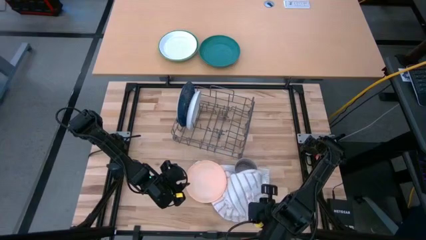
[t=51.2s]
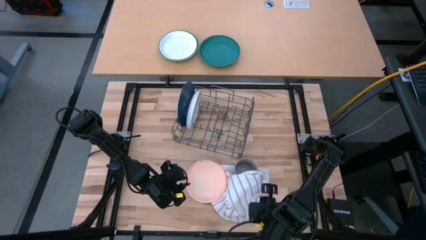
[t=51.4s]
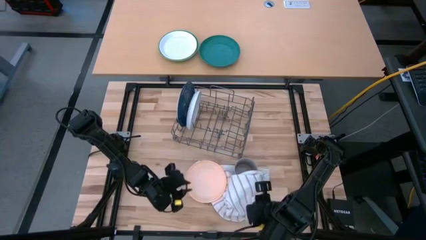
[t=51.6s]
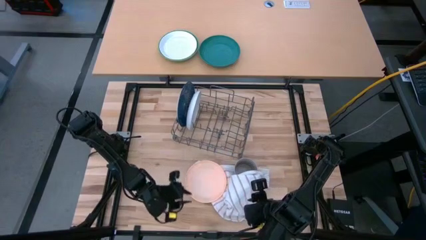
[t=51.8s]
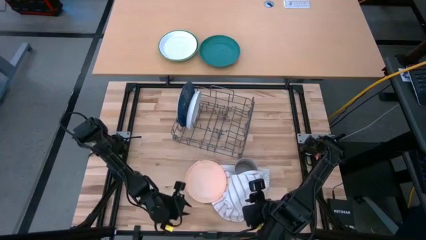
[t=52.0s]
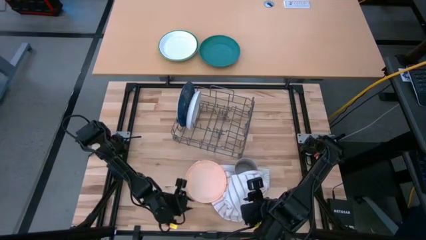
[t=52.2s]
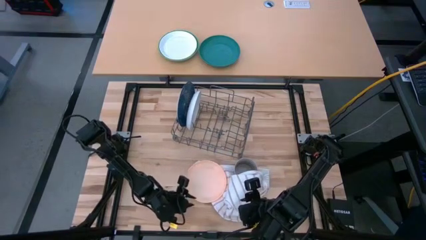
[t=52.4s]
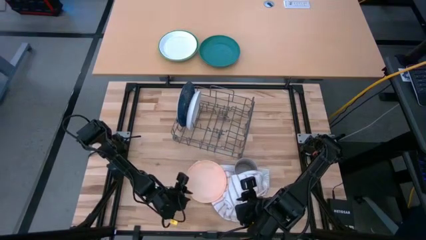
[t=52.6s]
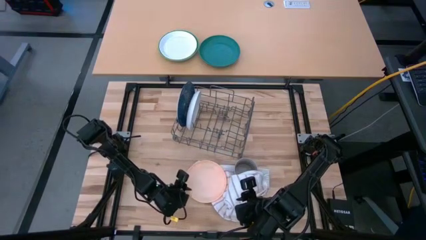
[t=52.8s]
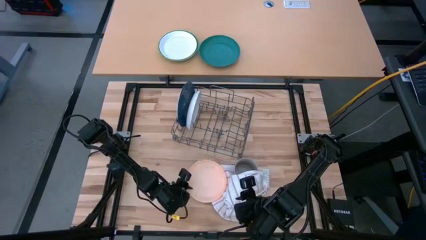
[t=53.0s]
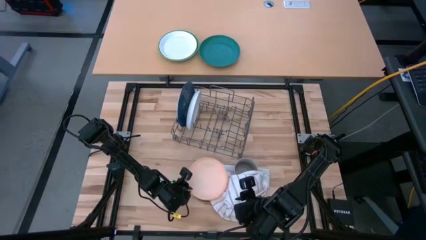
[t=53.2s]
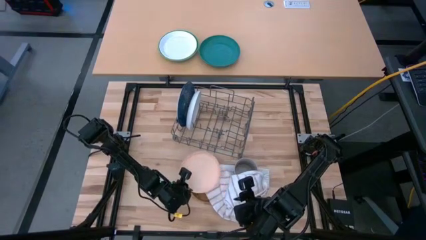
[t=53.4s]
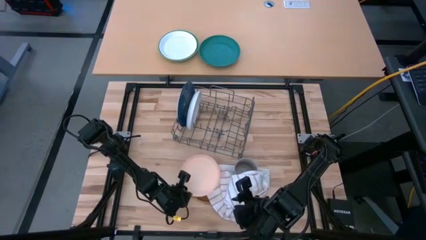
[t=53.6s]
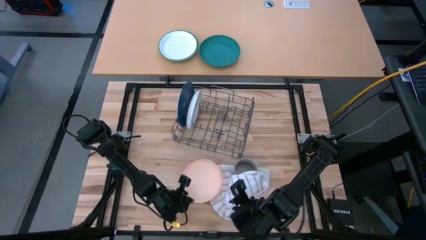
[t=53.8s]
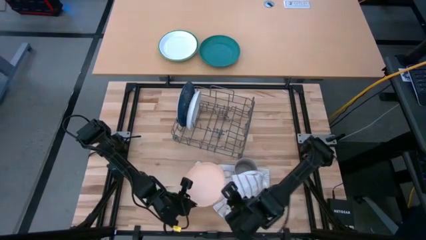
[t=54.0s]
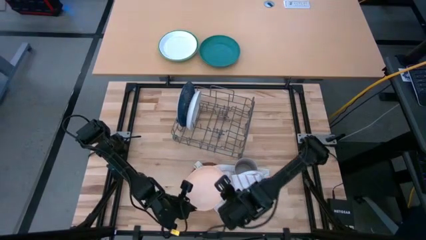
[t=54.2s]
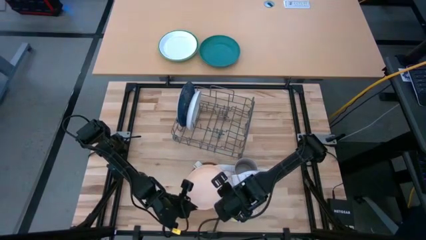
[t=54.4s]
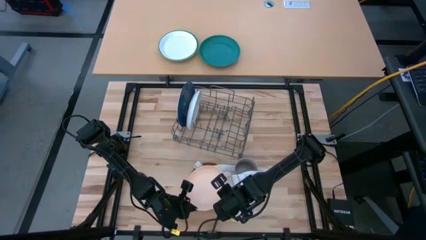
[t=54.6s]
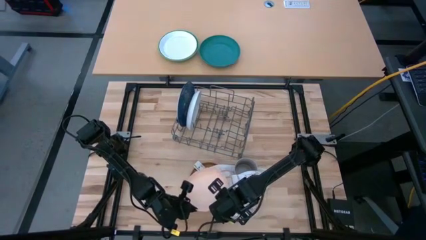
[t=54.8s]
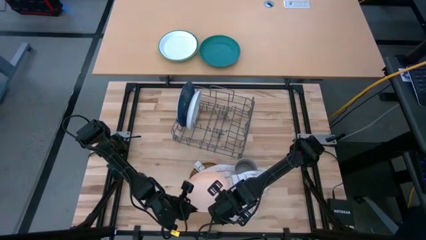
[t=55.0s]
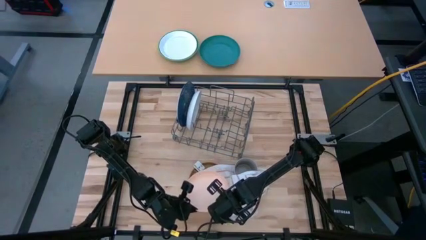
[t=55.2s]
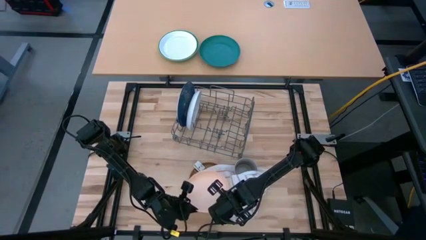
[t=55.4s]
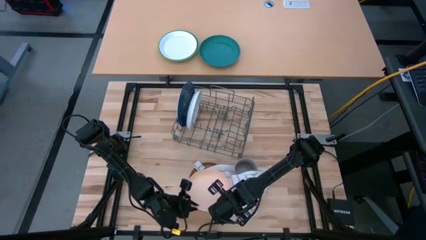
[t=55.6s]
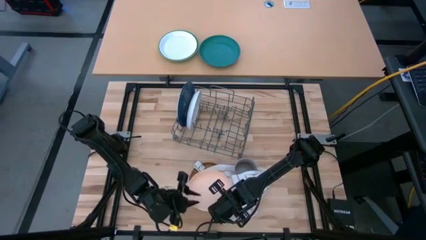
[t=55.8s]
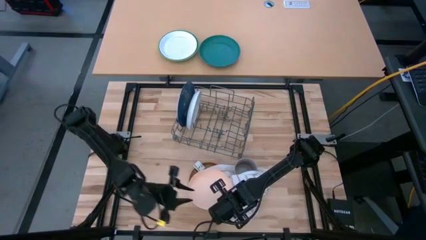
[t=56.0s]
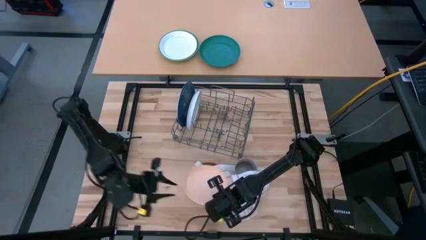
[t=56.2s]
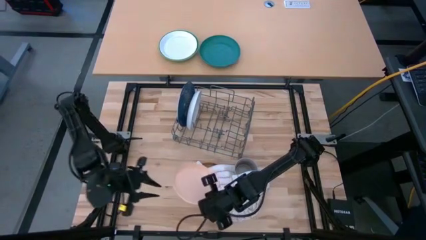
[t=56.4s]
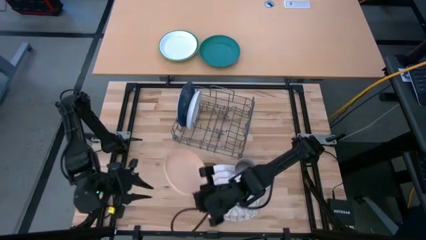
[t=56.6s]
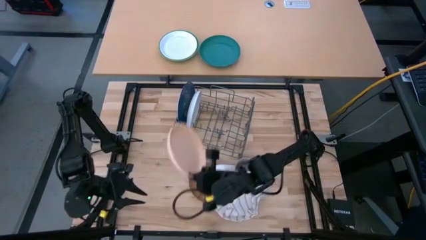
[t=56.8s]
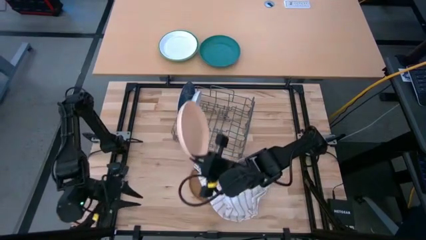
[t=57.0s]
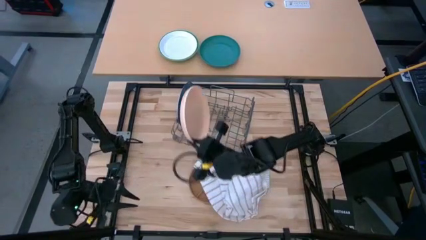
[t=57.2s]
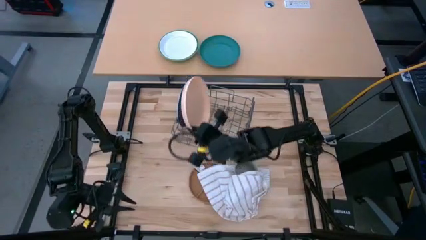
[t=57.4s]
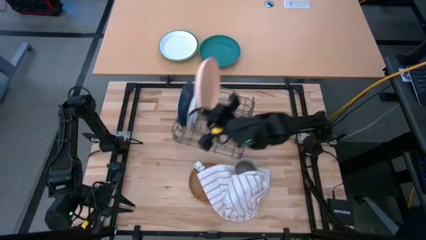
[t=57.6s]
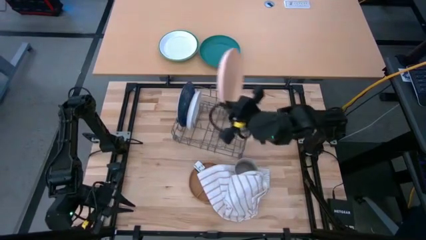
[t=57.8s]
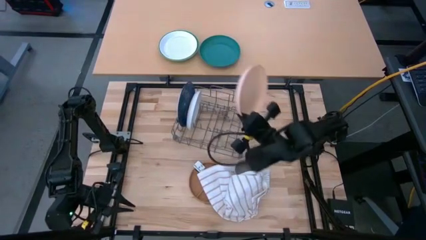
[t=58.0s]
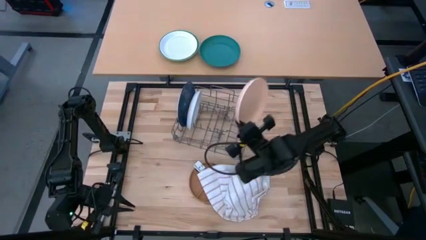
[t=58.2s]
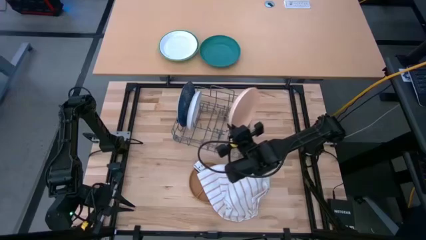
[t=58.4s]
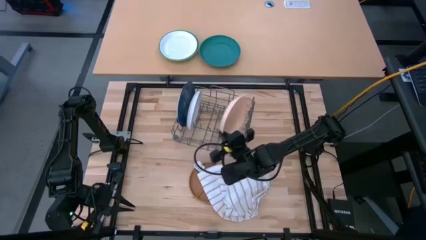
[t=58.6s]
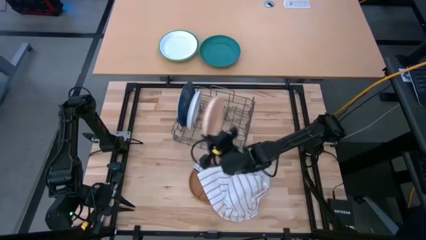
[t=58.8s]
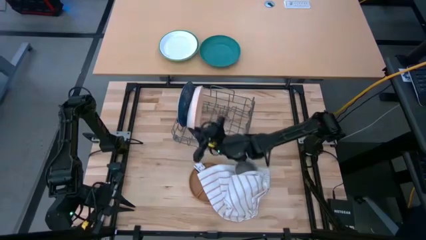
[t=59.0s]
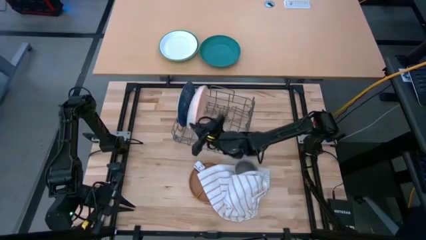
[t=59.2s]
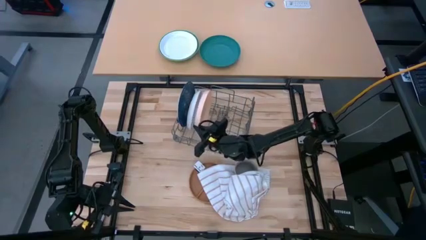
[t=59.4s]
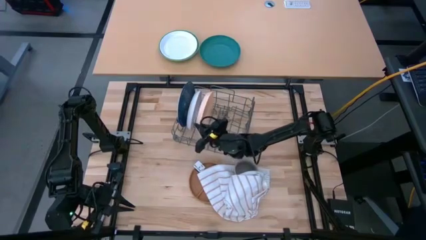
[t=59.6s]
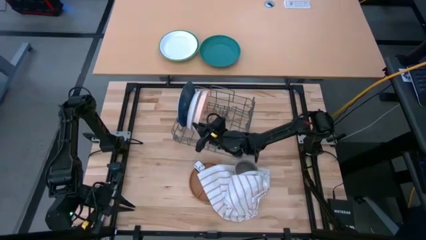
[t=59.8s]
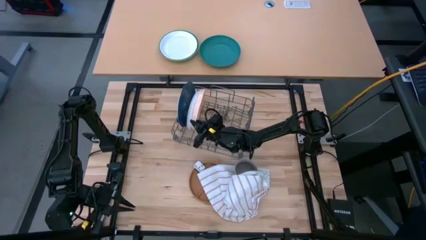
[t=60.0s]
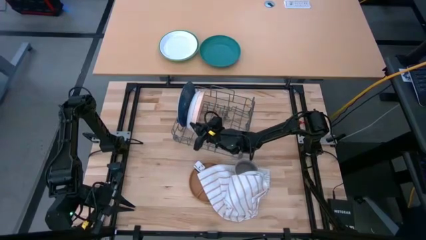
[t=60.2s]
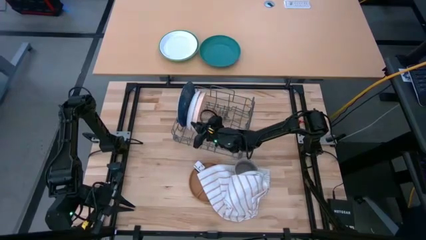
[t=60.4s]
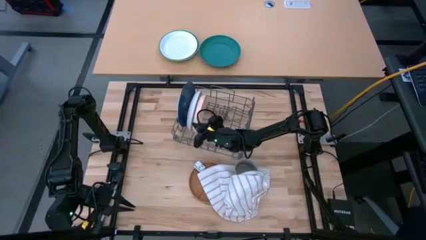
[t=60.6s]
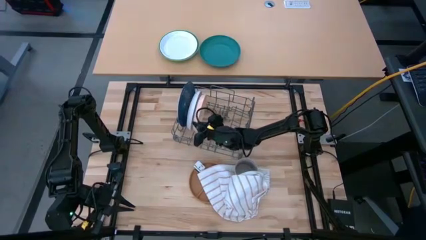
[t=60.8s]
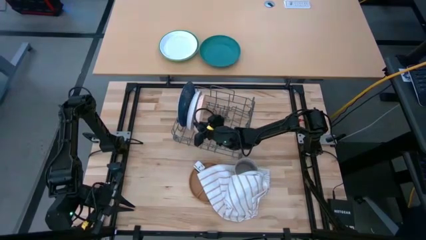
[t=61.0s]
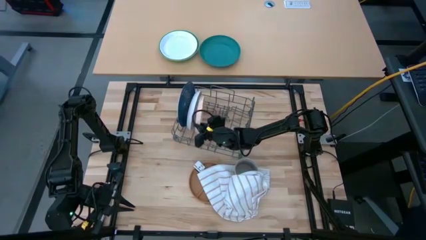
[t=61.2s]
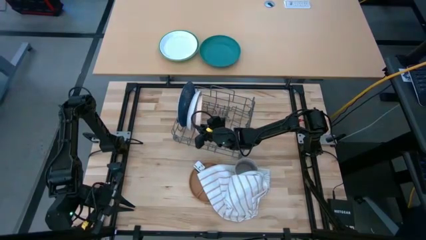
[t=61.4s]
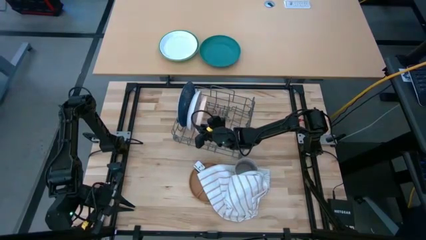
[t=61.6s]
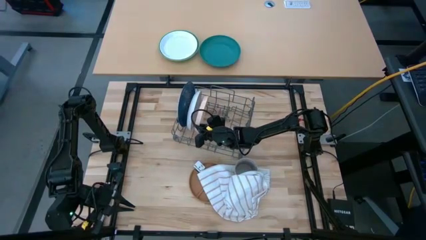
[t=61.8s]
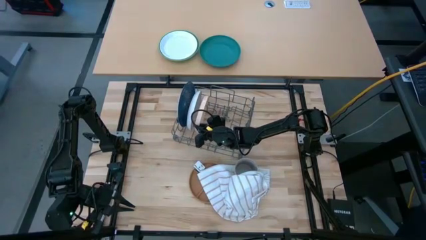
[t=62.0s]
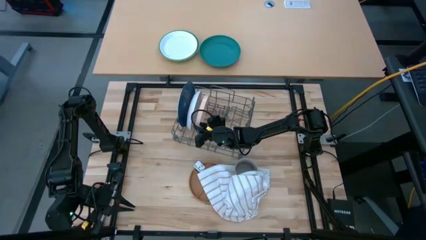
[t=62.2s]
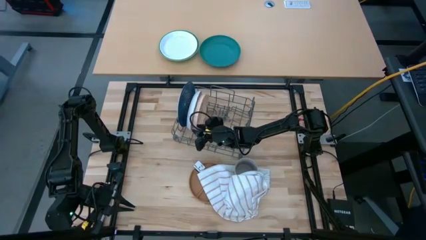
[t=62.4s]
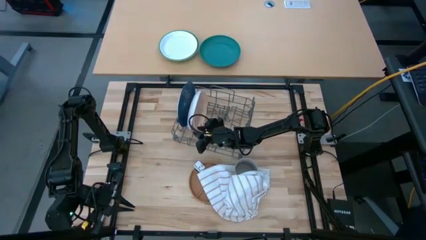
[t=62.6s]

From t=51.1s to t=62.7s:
Task: Sort dishes
Put the light orange plate into the dish rack

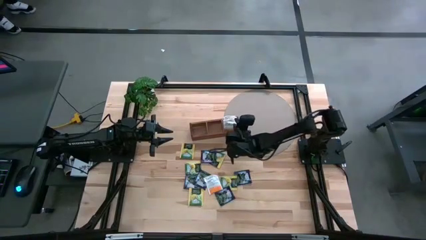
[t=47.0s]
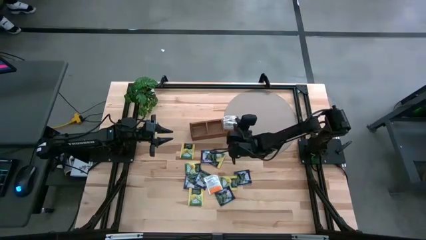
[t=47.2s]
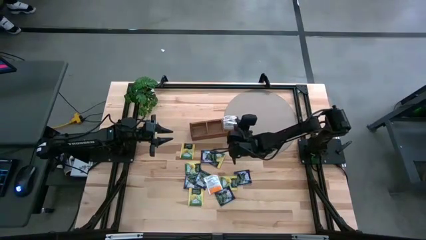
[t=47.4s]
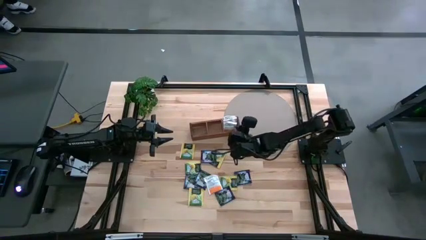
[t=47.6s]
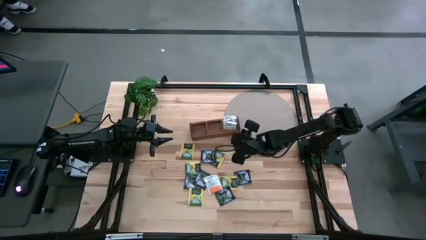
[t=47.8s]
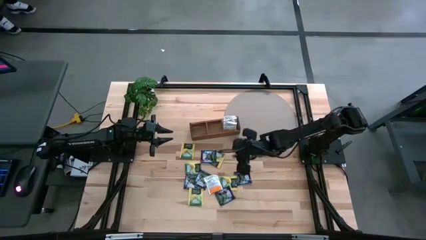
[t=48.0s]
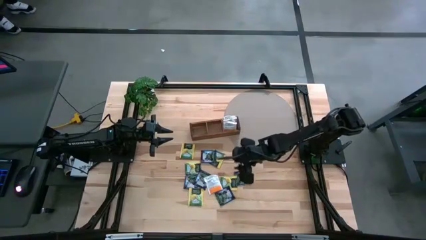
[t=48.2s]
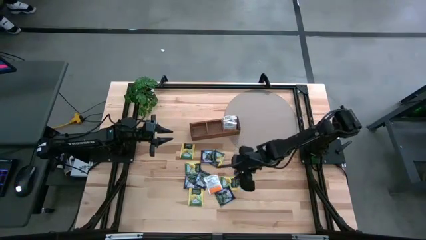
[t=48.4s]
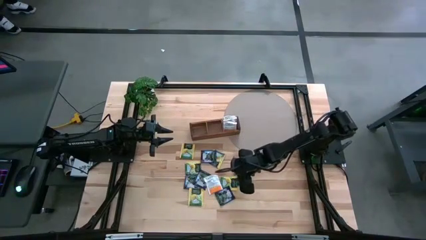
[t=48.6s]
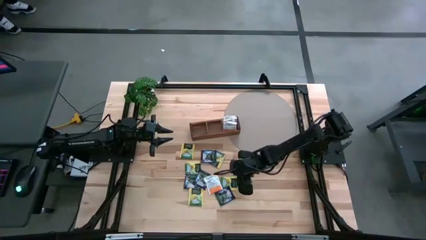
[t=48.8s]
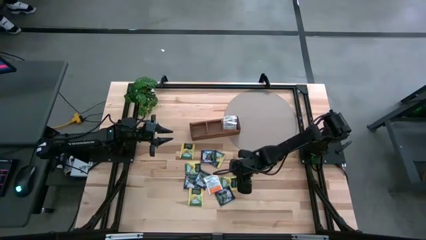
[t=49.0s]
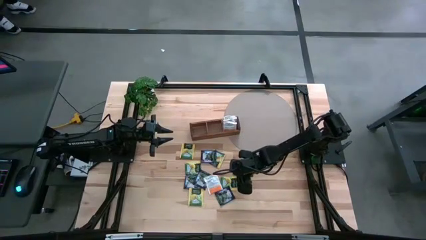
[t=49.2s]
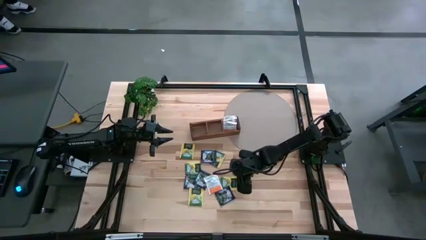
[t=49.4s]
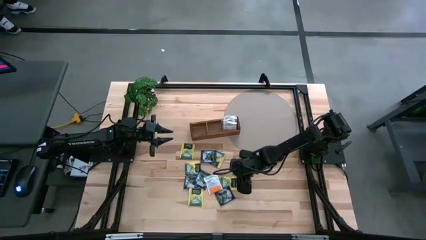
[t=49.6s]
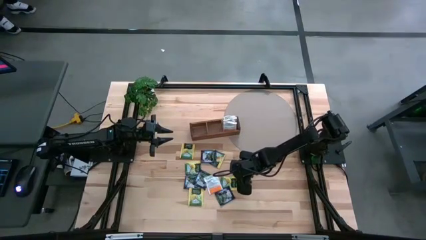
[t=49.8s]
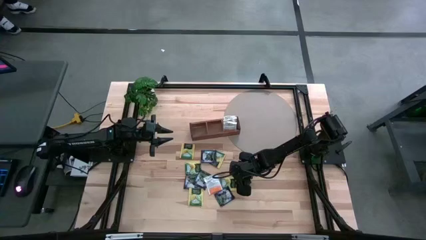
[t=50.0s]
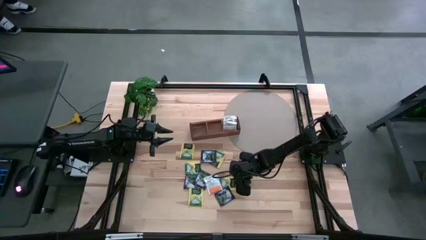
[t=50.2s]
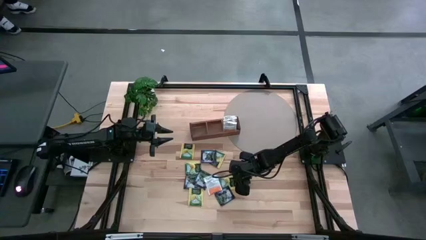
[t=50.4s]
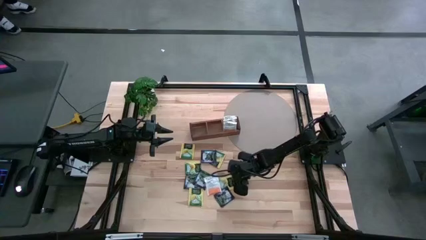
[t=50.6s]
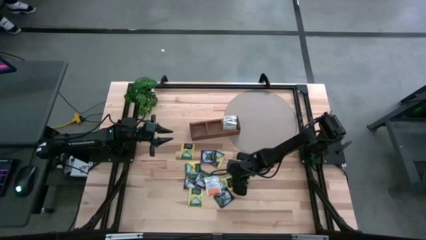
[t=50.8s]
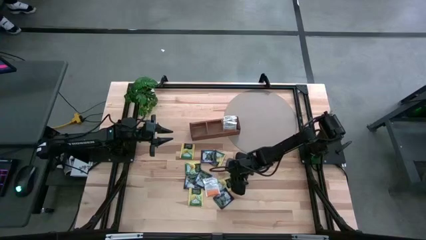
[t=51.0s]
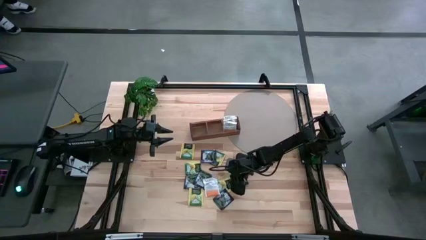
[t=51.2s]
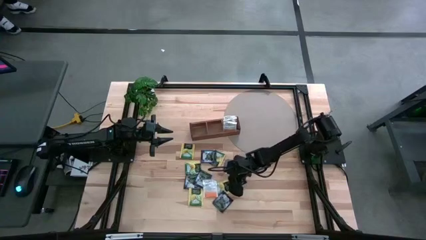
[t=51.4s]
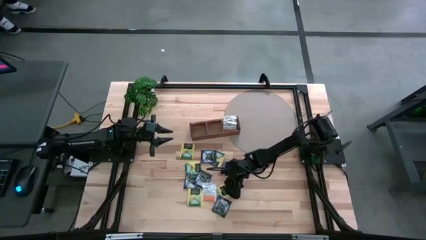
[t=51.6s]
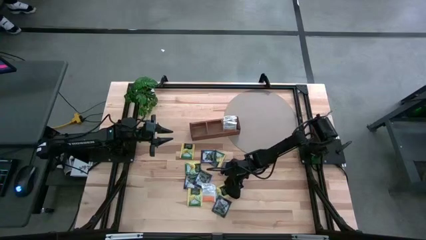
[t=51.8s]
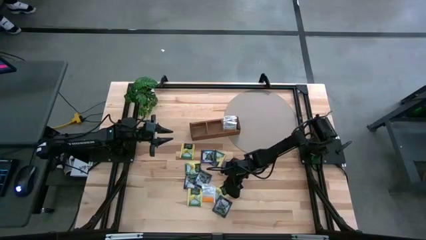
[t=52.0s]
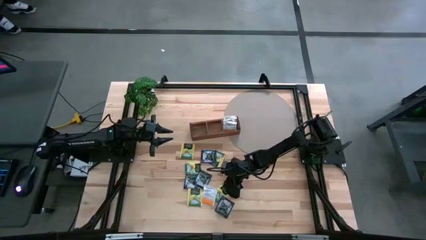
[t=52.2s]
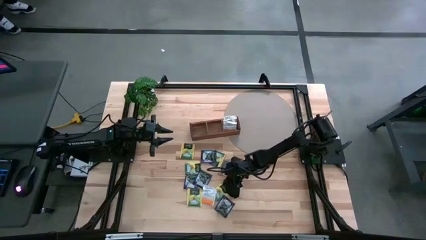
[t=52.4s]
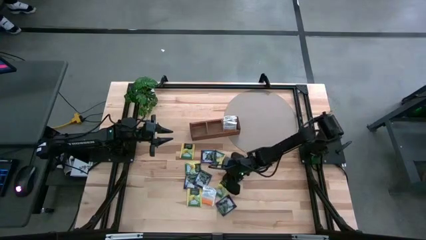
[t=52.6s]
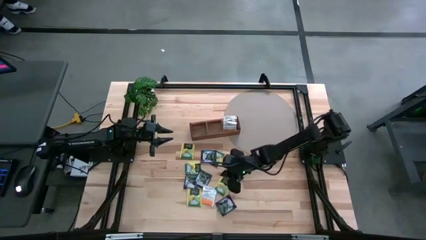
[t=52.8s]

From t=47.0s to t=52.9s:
Task: Pick & Place Tea
Put the yellow tea bag into the middle section of the wooden organizer
